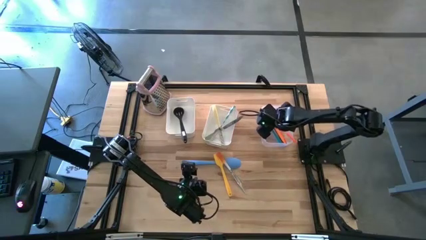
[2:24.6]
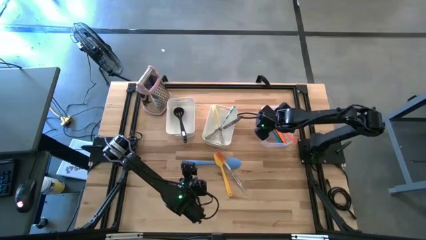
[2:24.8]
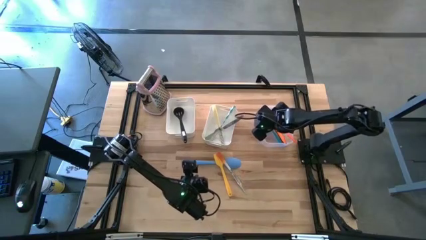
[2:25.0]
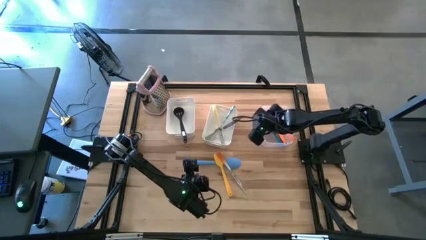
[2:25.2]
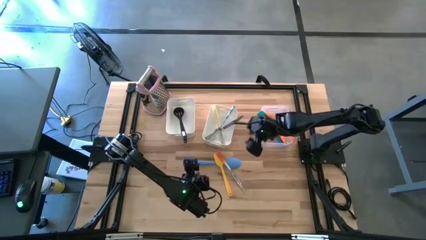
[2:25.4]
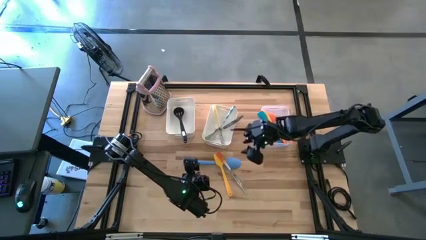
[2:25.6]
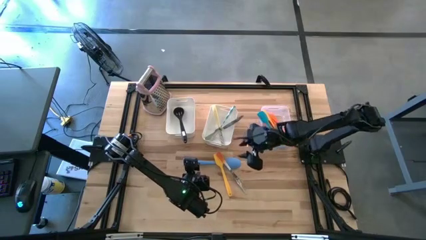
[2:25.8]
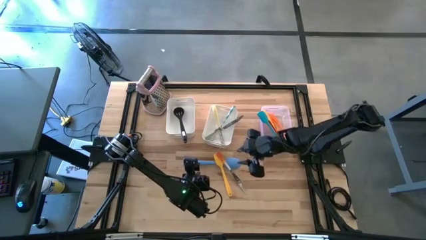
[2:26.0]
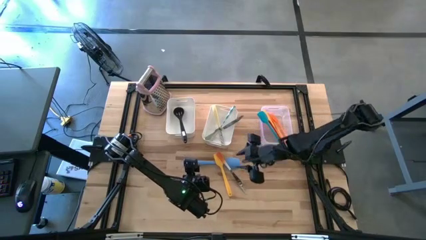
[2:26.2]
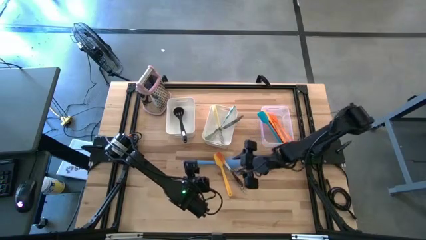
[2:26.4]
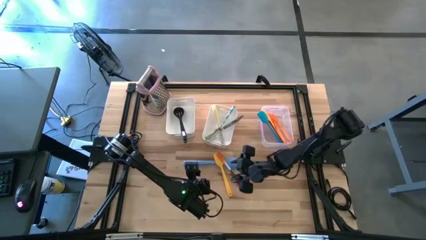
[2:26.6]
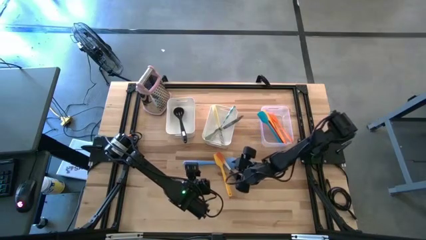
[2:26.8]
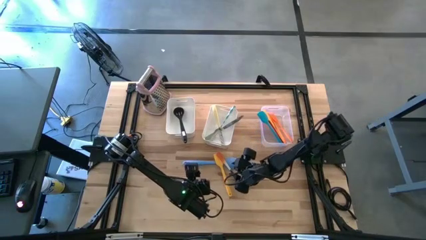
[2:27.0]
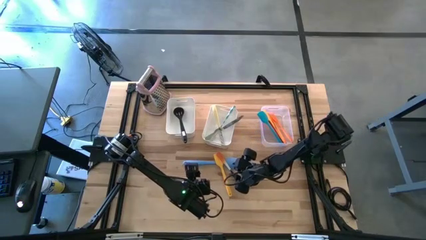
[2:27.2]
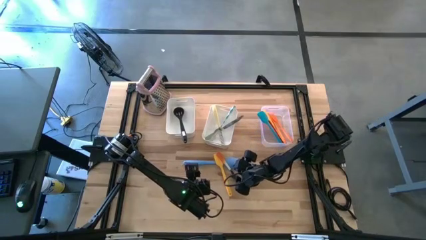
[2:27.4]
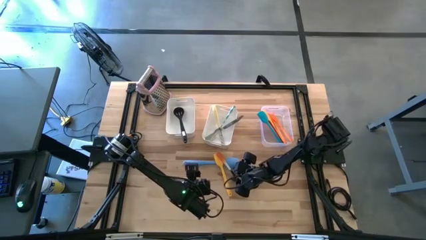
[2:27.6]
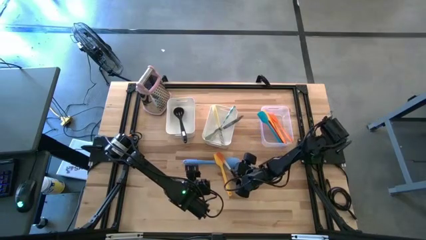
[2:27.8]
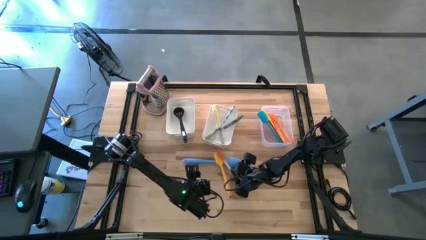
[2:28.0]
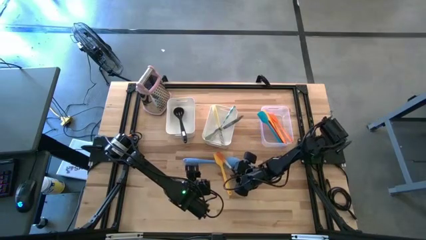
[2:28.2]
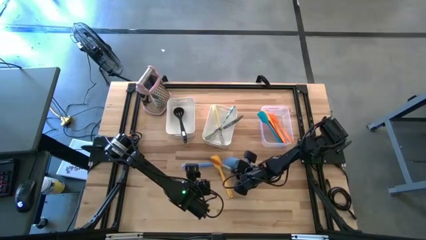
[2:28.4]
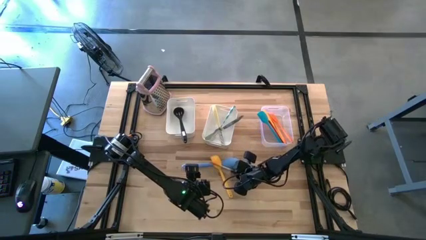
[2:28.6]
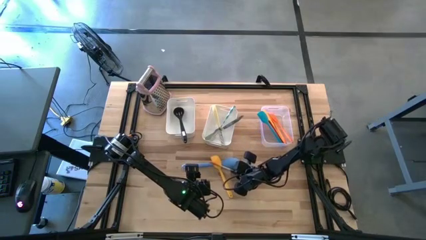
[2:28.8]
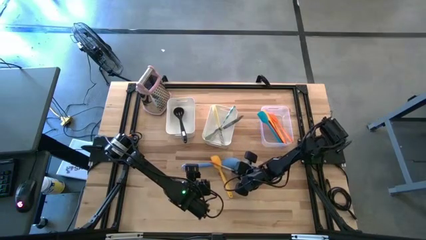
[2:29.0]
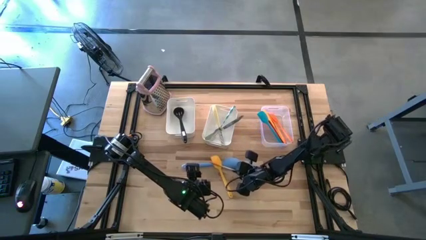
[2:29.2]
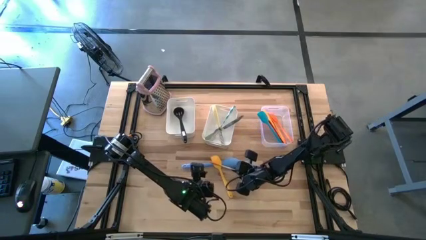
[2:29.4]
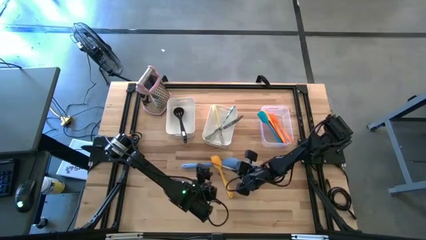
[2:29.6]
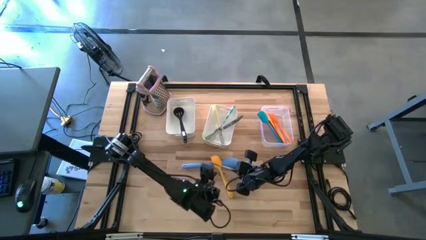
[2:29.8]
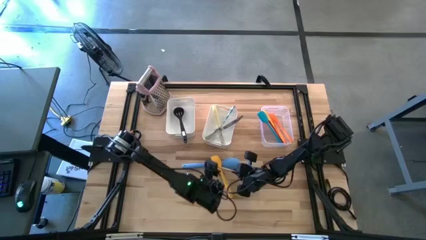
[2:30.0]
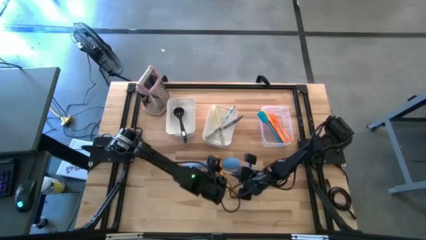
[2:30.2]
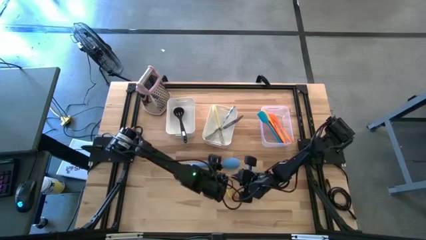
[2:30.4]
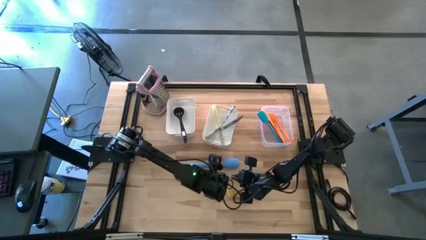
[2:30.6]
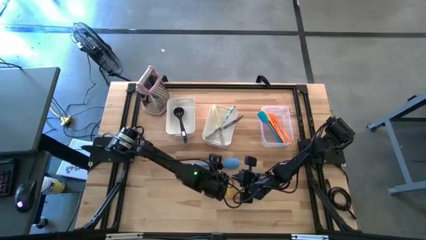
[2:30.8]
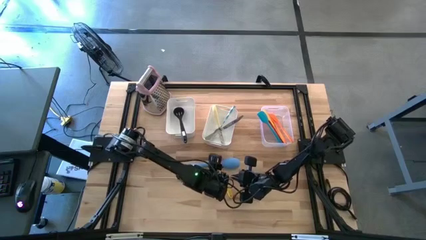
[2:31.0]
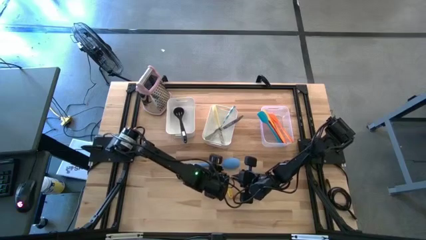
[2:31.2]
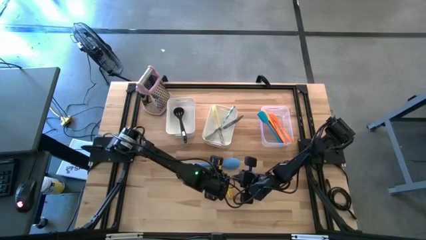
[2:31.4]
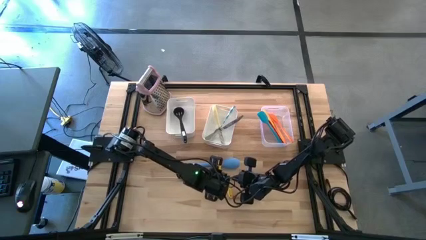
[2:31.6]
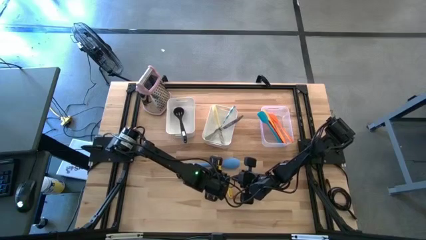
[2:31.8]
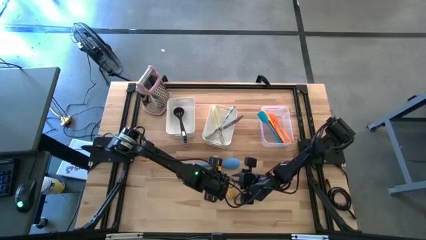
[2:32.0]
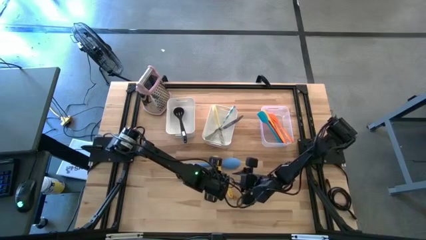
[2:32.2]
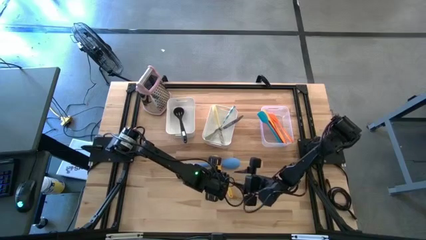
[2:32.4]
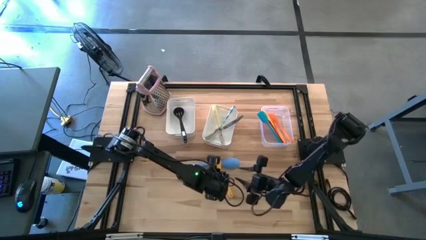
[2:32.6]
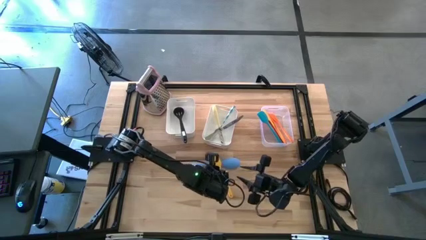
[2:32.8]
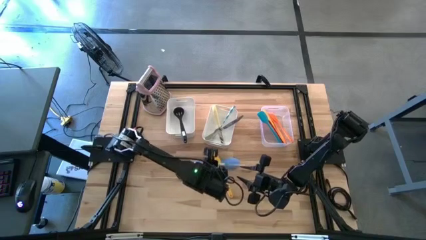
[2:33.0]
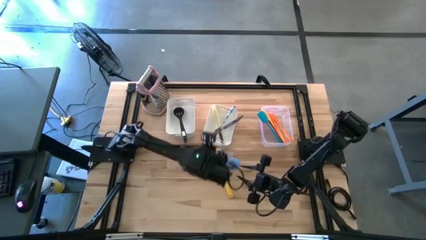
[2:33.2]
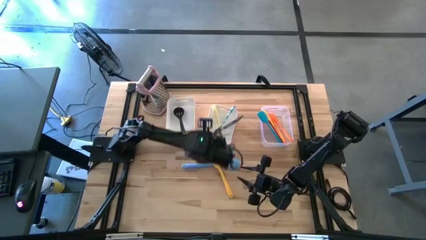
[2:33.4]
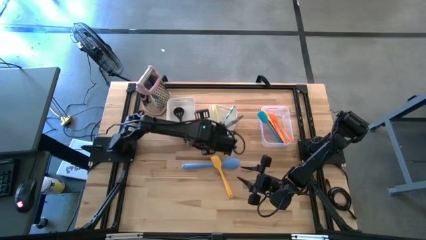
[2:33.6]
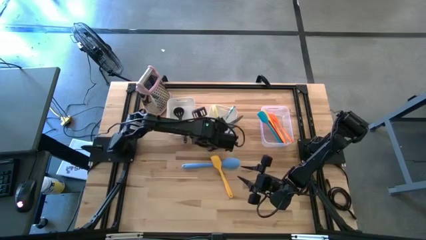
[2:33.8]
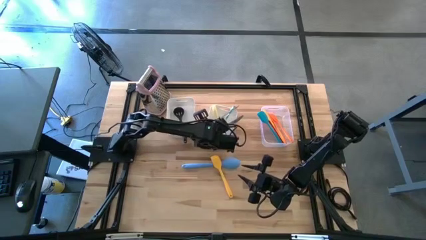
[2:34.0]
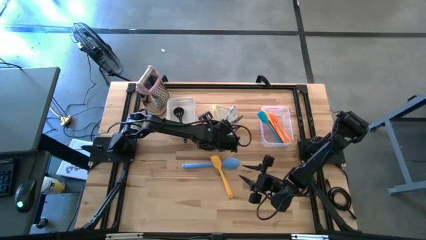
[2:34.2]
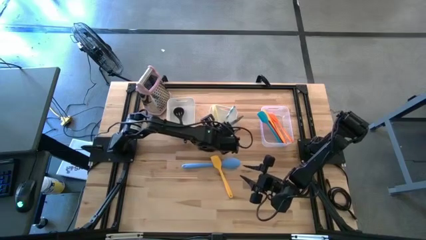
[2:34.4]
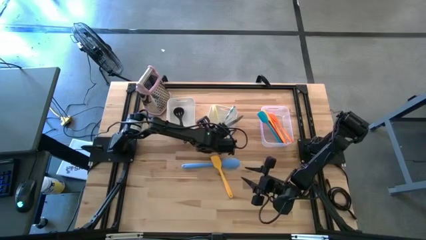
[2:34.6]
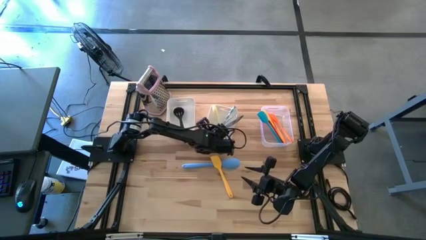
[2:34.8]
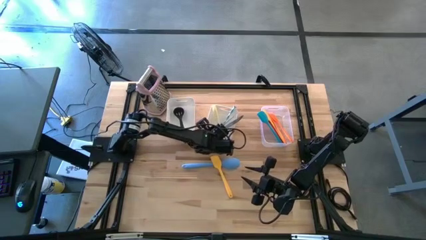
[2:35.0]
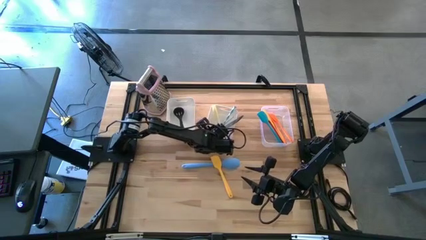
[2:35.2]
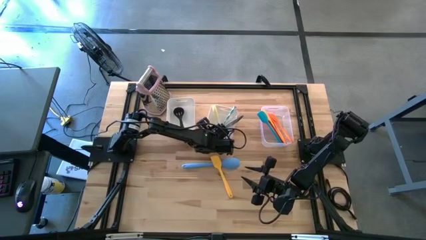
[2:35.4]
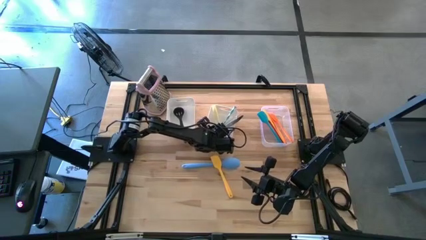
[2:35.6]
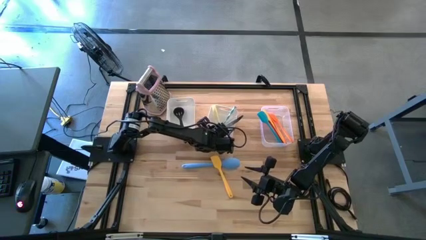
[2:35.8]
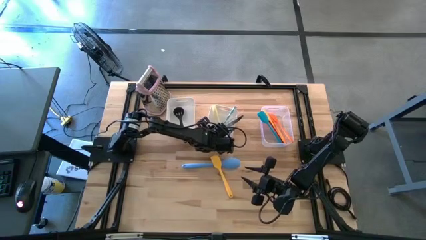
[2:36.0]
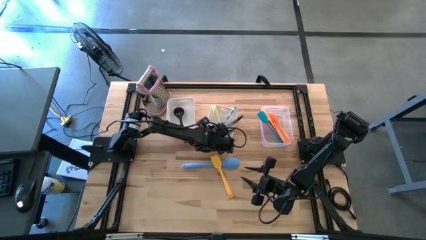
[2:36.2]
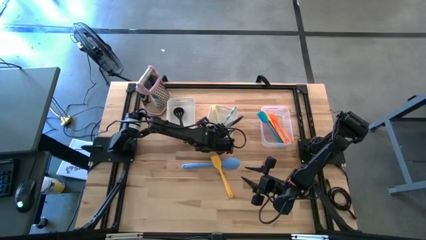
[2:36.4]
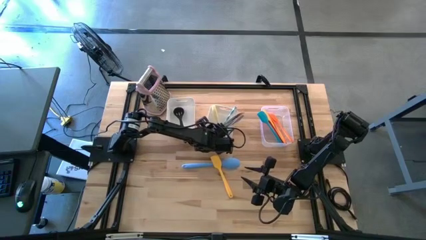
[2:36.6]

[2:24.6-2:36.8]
Task: Pick & Place Kitchen Items
Put the orange table knife into the right white bin
